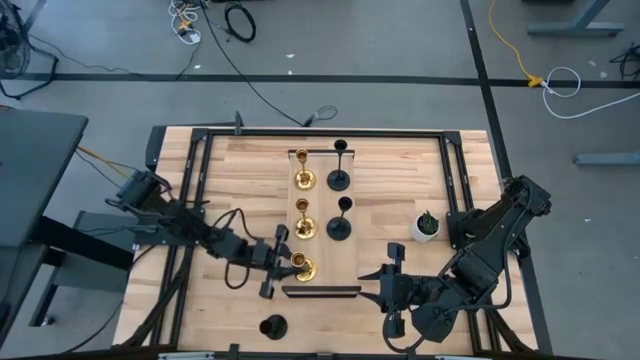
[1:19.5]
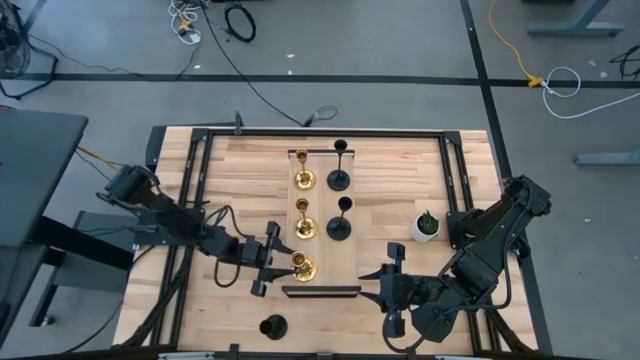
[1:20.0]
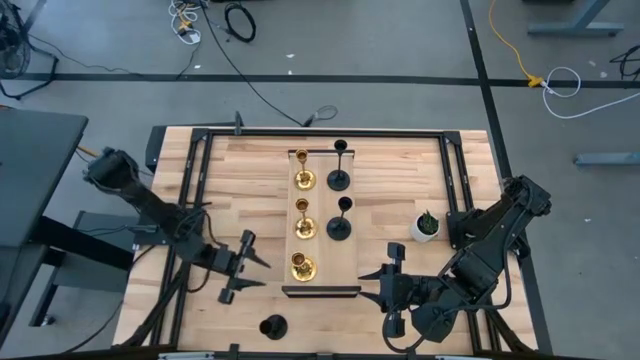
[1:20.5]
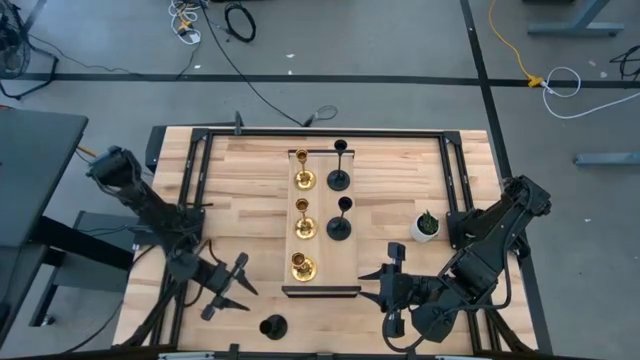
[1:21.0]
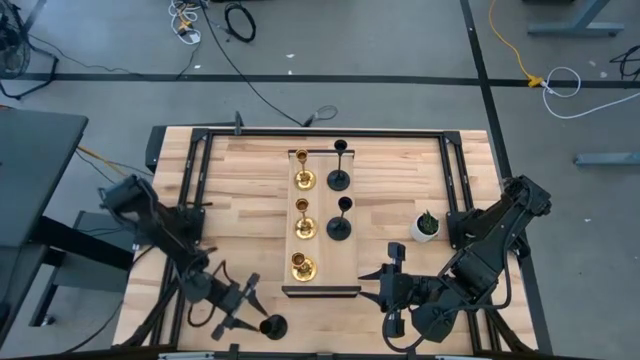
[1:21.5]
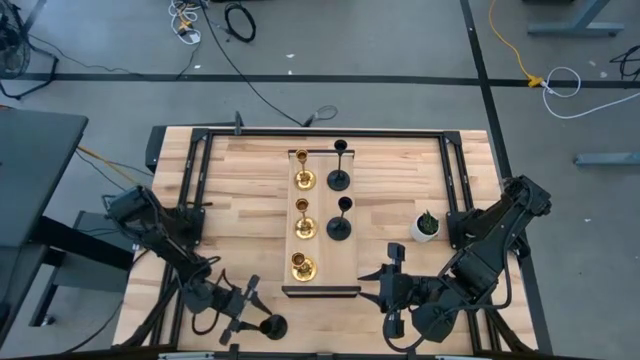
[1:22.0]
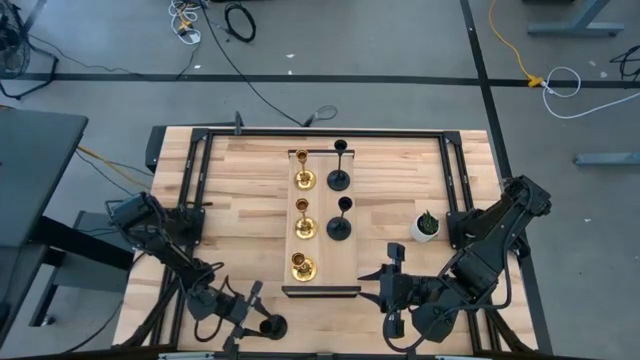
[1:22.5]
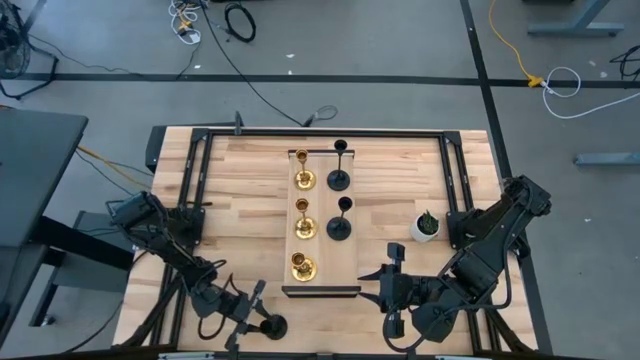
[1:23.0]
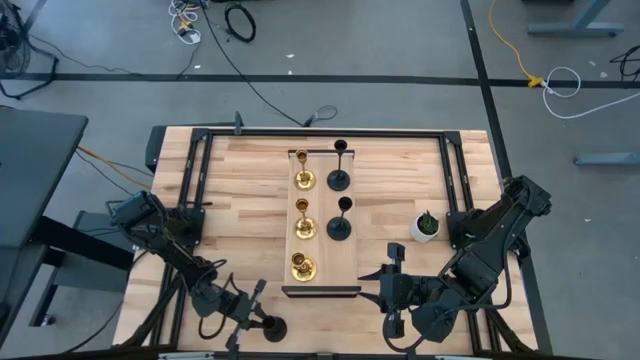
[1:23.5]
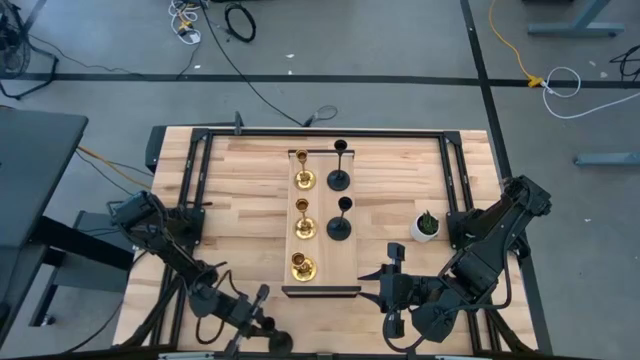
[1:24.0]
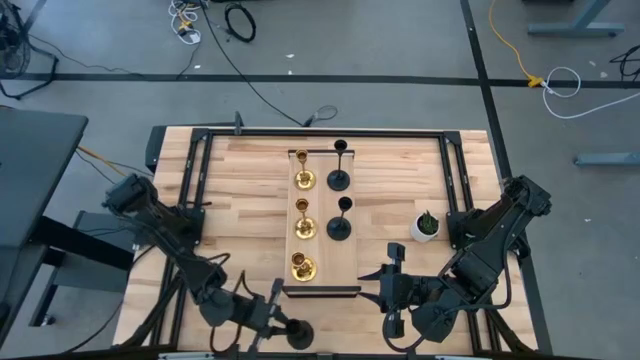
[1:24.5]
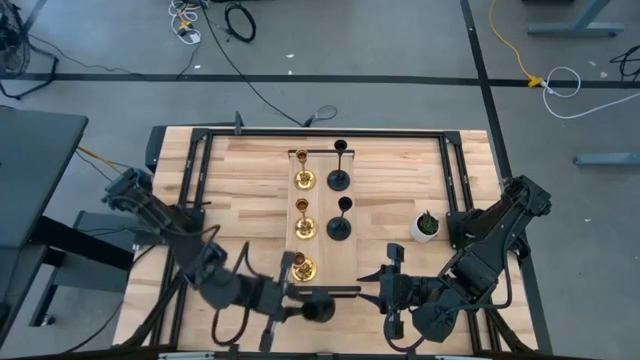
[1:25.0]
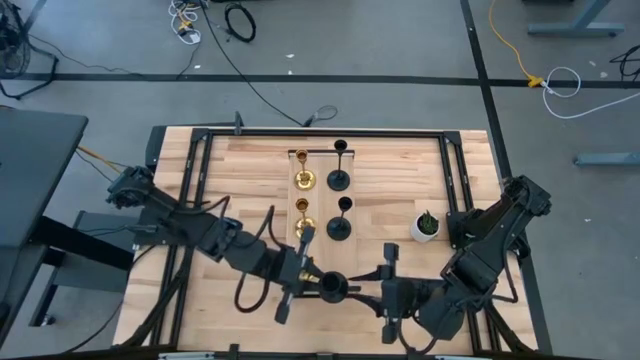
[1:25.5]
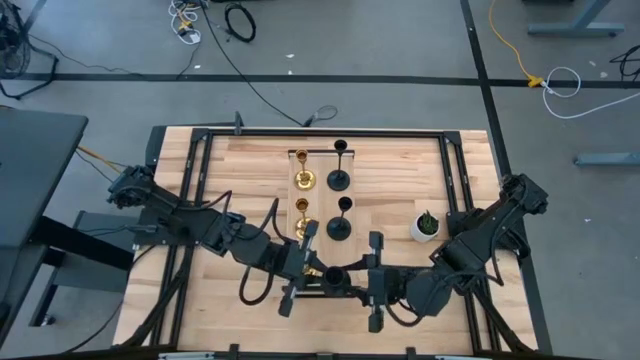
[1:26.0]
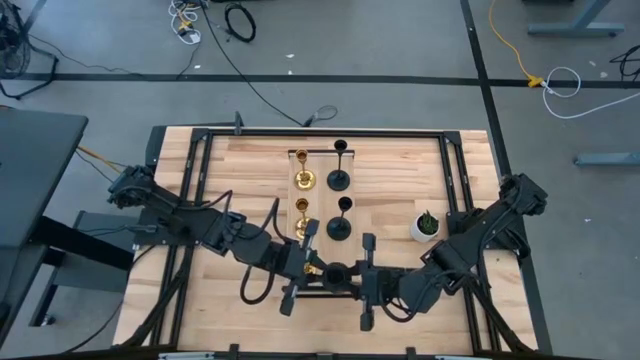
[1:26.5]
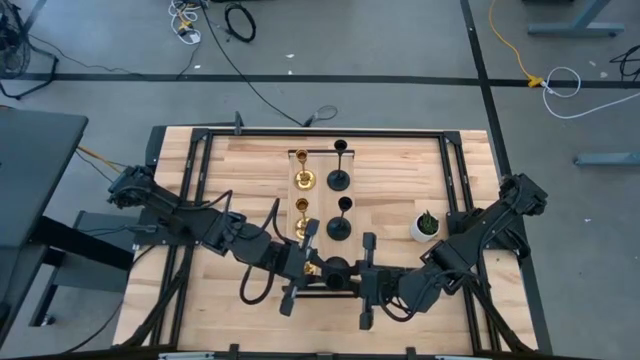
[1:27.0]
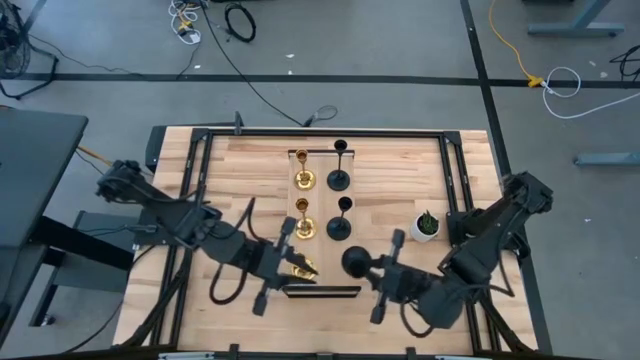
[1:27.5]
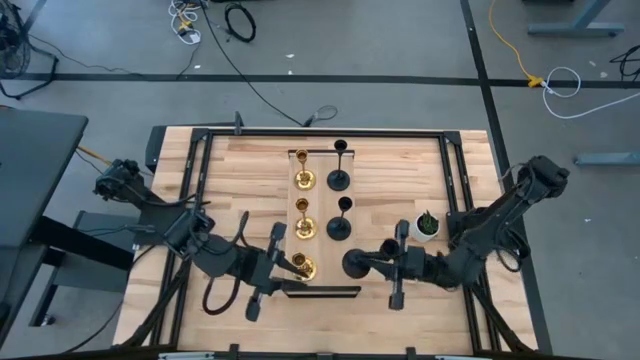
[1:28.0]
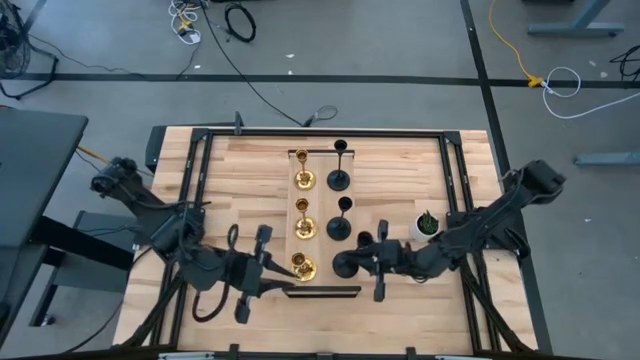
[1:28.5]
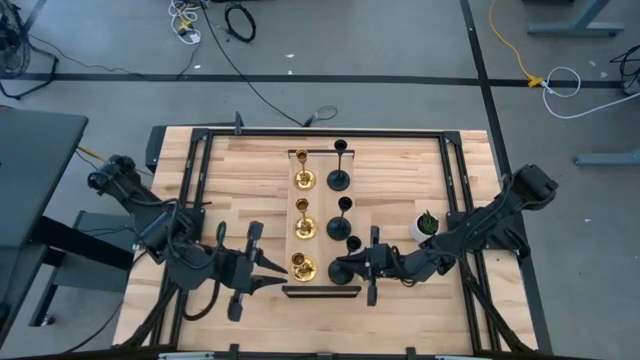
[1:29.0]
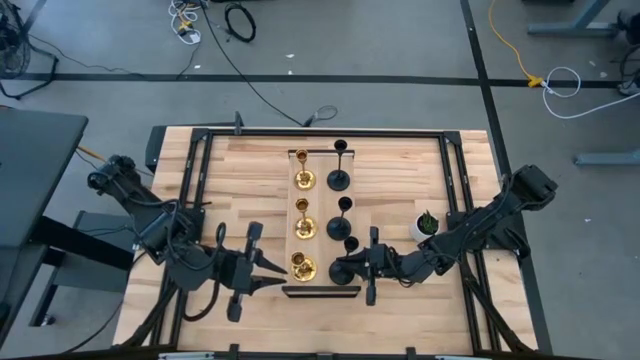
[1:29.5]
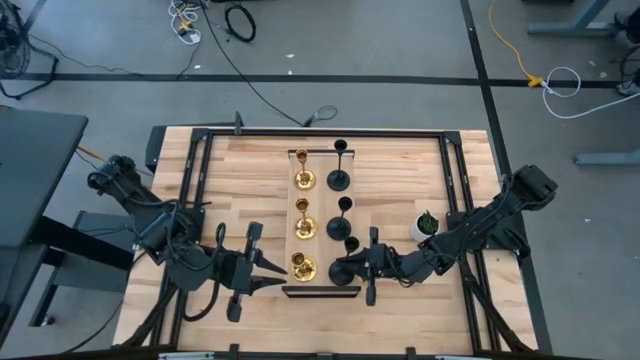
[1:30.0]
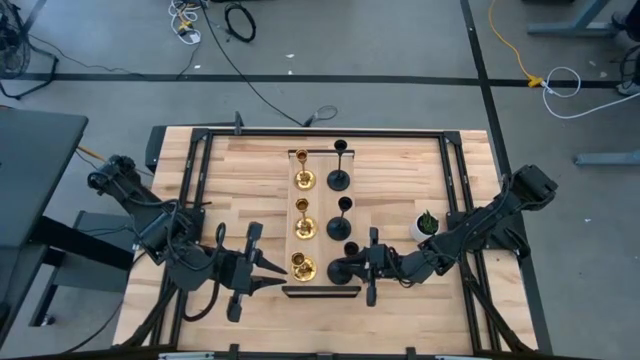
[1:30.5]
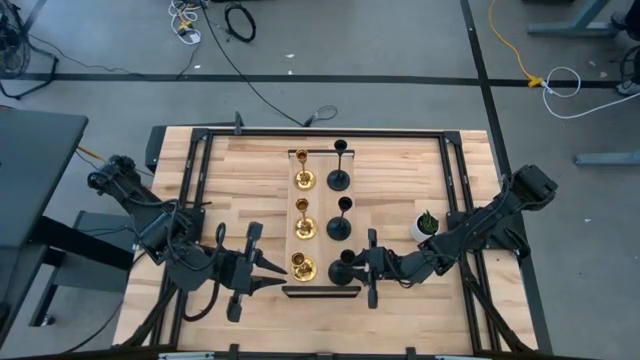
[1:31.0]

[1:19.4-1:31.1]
Task: Pick & Place candle stick holders
Put the black candle holder on the shelf

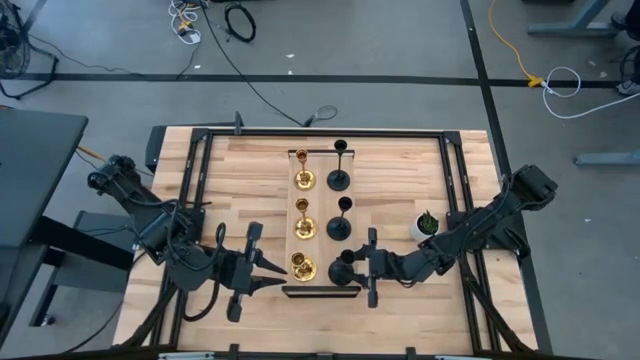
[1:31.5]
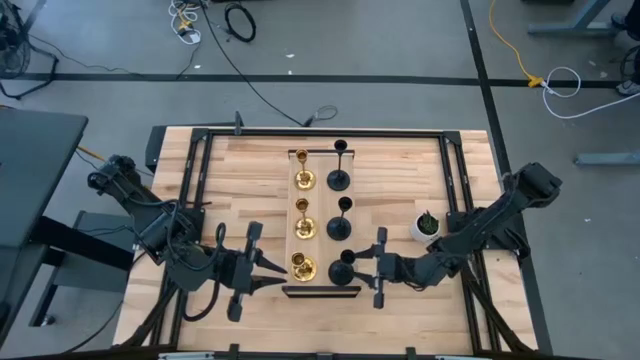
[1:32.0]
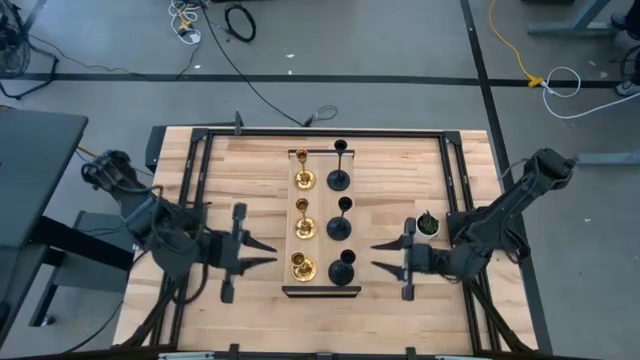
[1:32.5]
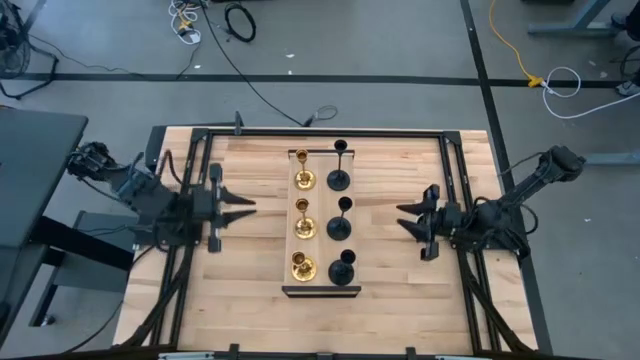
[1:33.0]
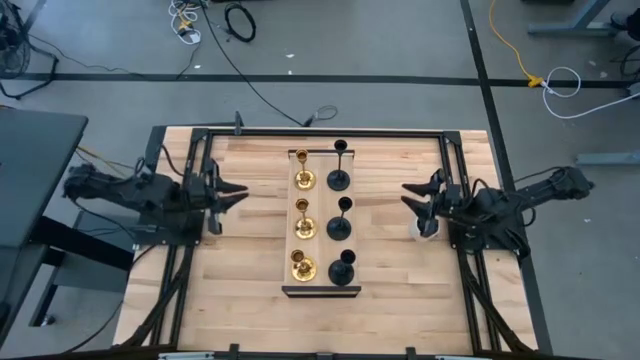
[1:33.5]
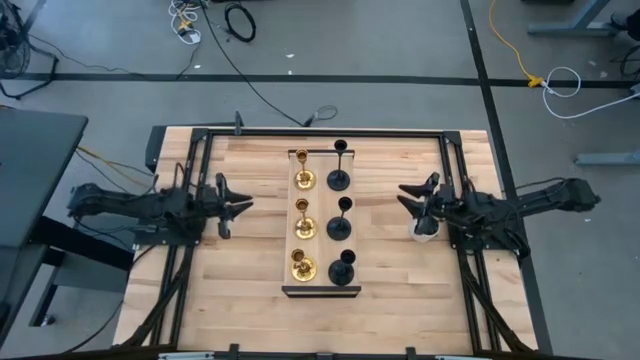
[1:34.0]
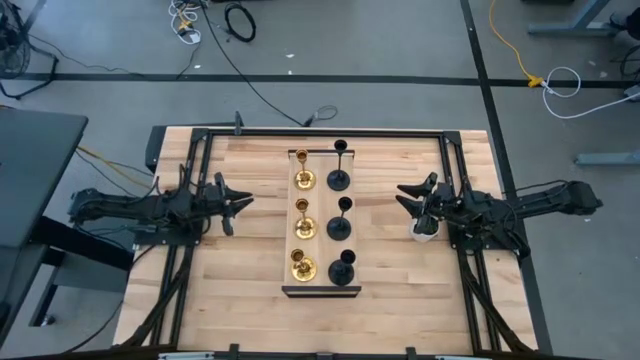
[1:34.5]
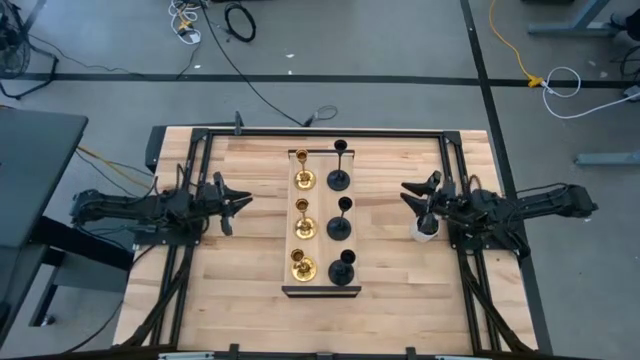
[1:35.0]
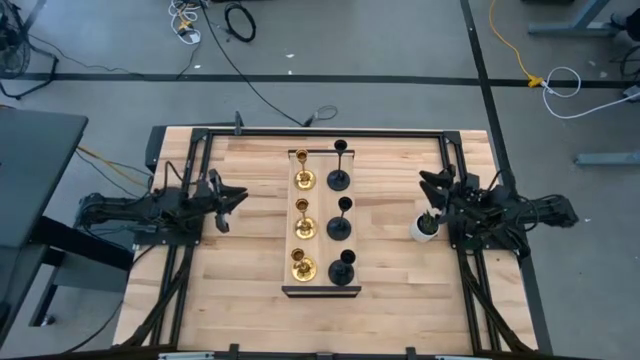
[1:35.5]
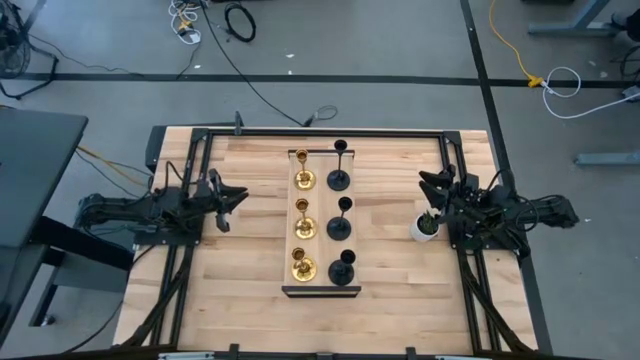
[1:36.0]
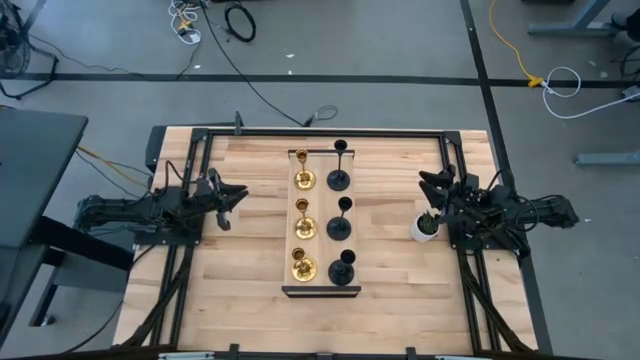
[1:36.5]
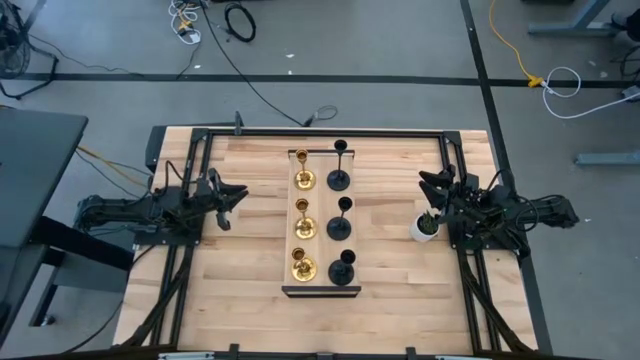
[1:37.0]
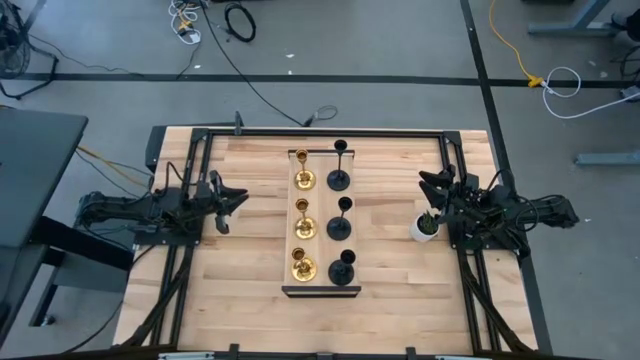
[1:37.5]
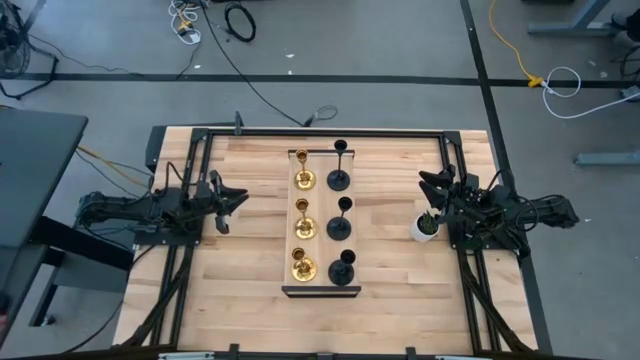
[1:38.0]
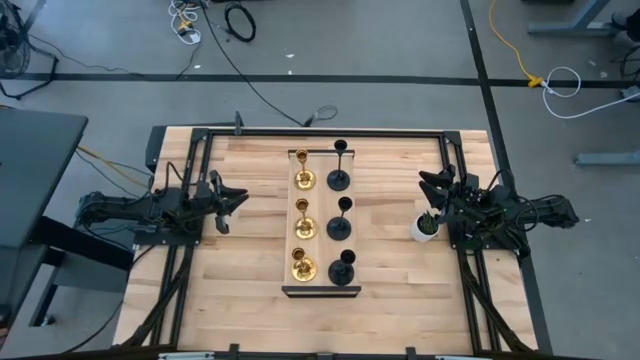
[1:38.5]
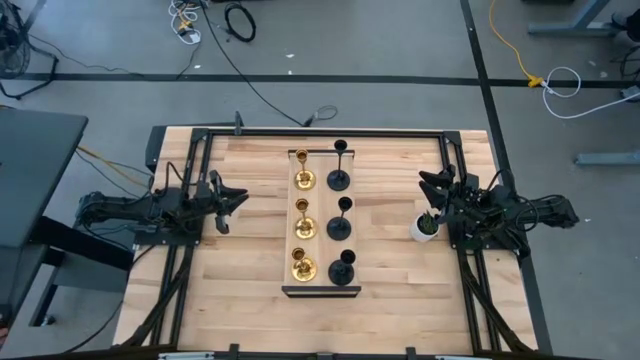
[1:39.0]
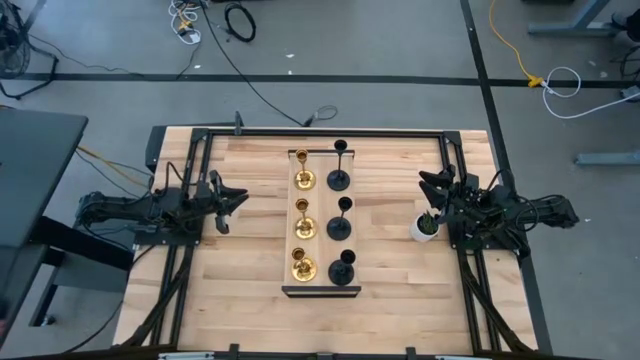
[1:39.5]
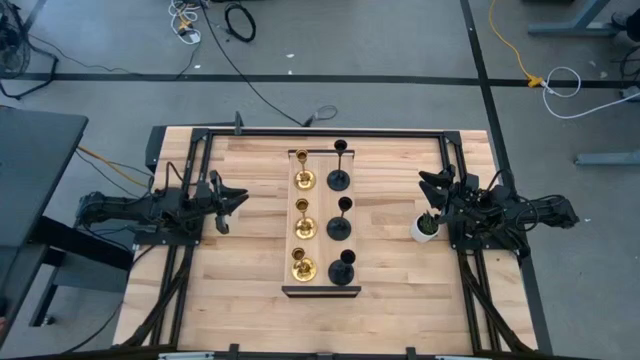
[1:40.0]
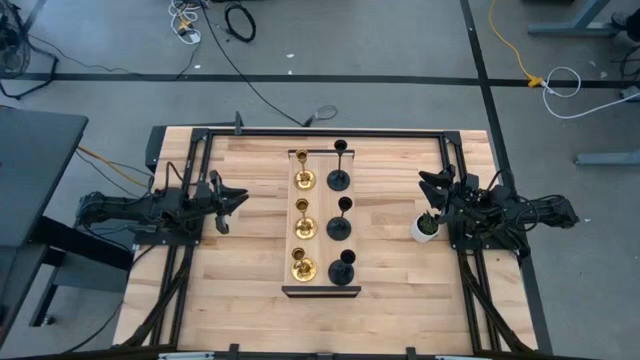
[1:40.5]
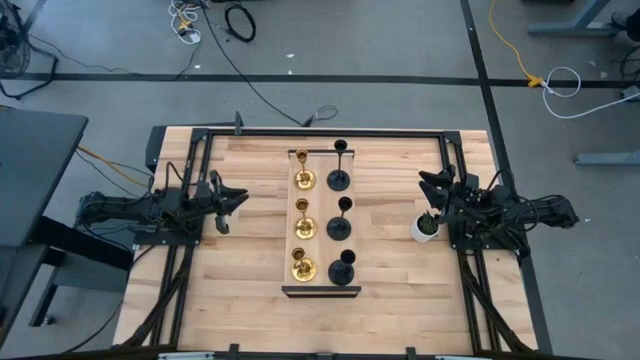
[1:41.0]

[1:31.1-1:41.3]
Return to Home Position
